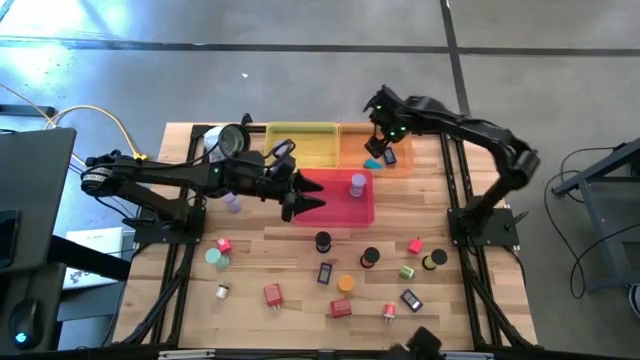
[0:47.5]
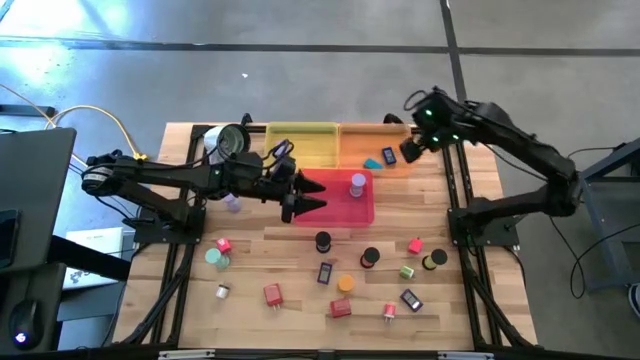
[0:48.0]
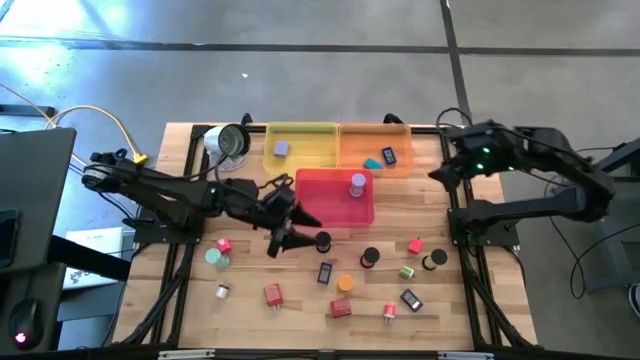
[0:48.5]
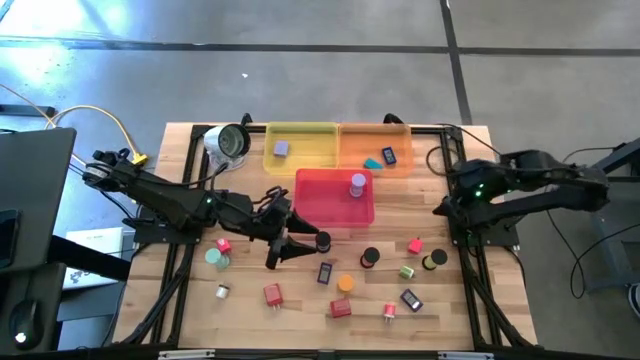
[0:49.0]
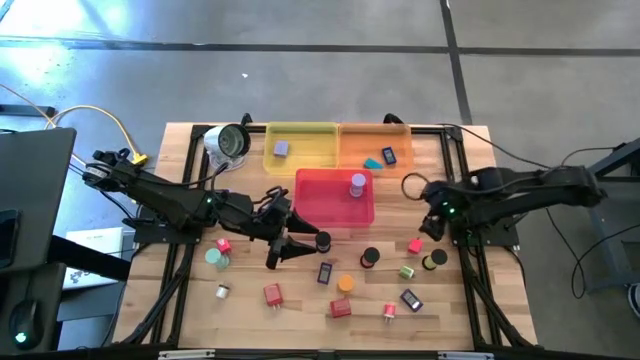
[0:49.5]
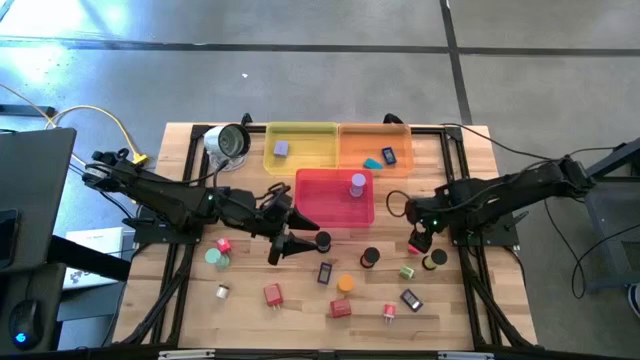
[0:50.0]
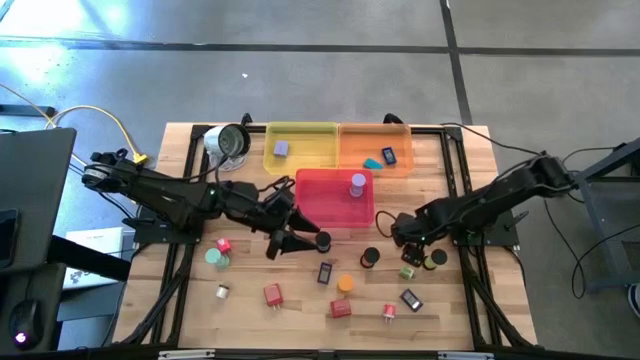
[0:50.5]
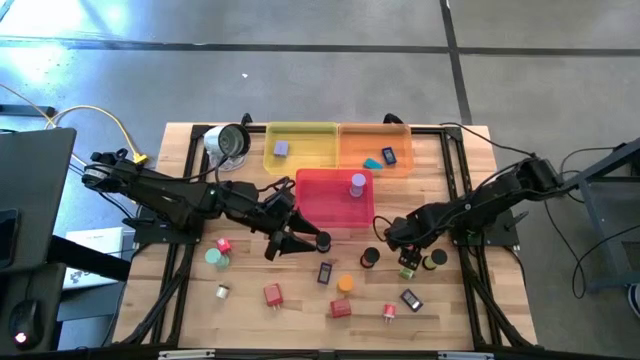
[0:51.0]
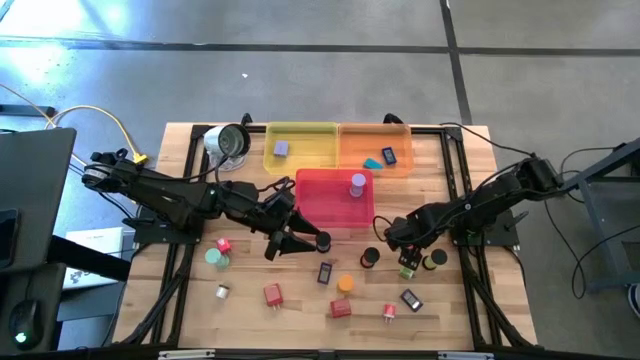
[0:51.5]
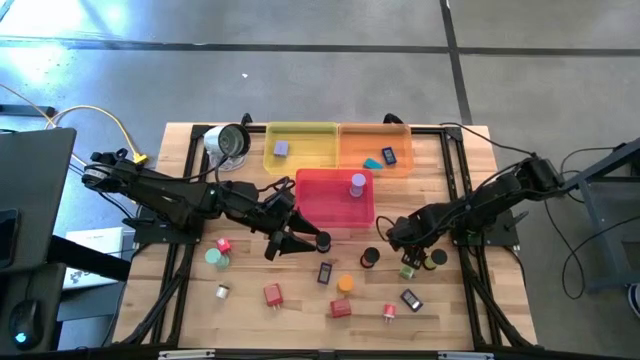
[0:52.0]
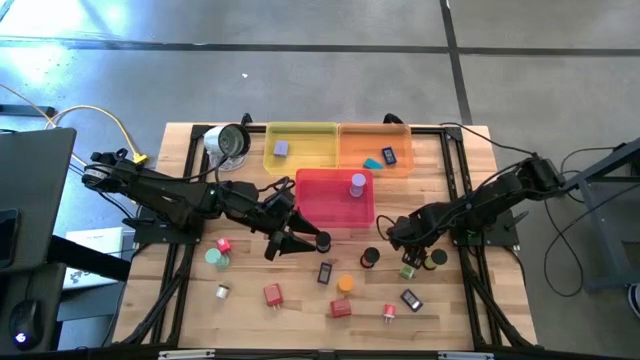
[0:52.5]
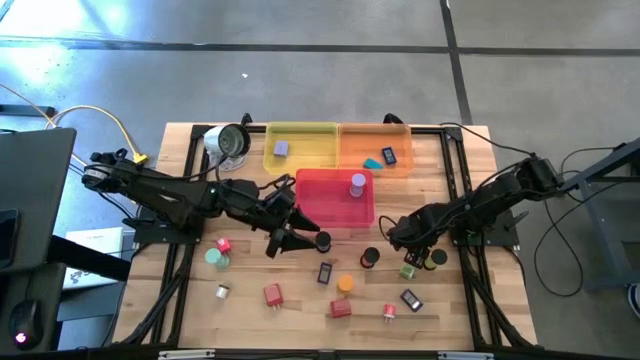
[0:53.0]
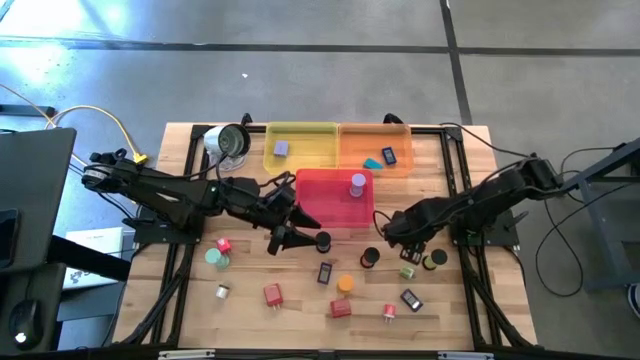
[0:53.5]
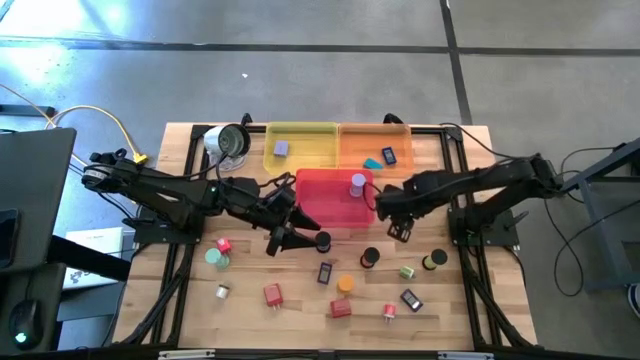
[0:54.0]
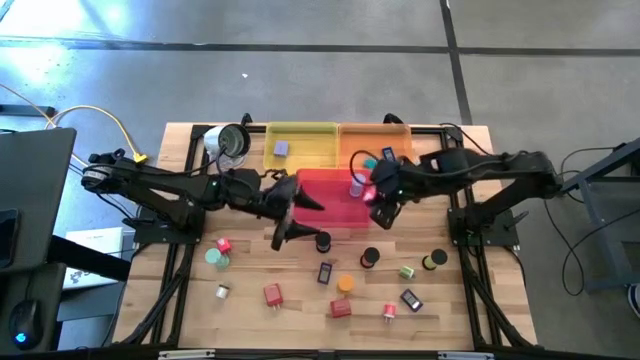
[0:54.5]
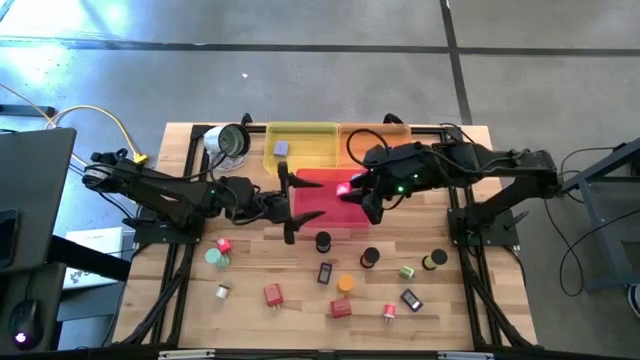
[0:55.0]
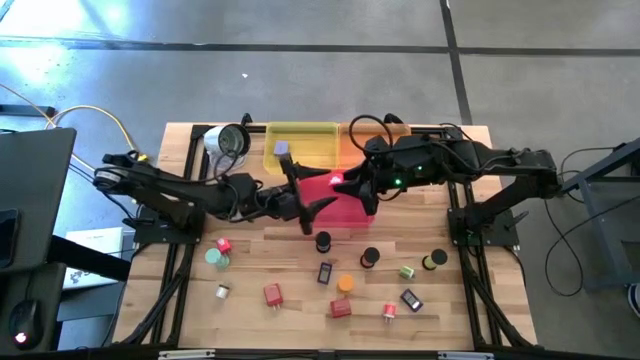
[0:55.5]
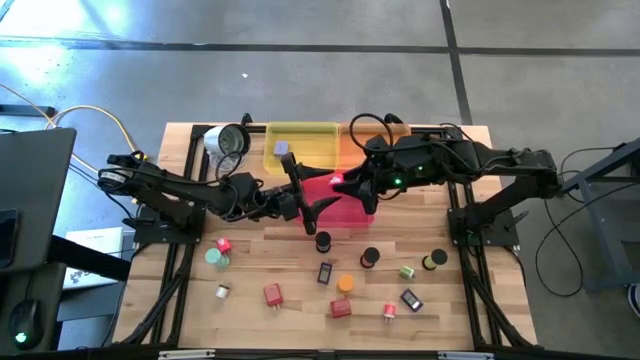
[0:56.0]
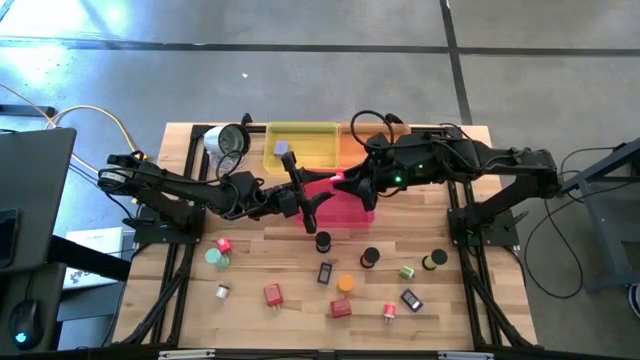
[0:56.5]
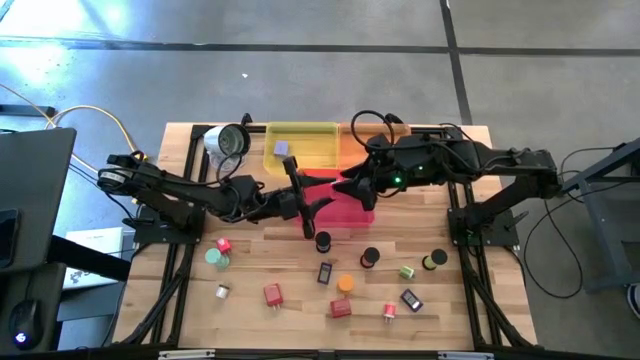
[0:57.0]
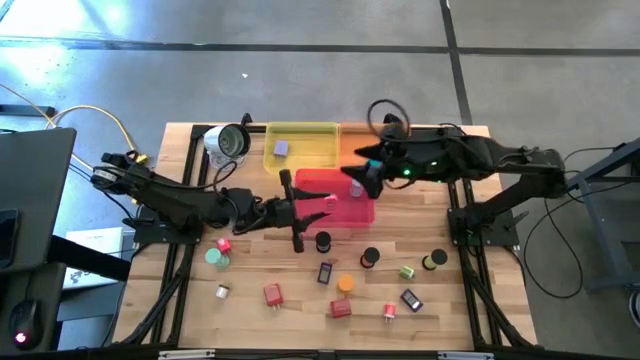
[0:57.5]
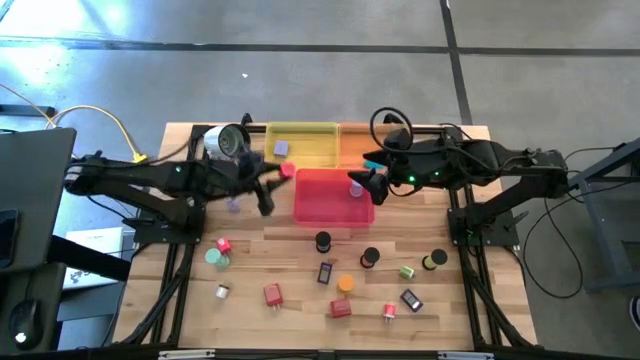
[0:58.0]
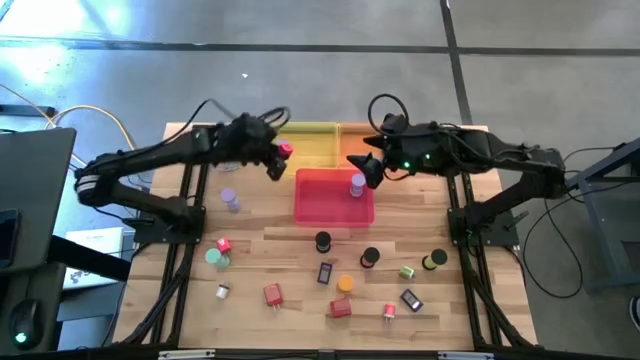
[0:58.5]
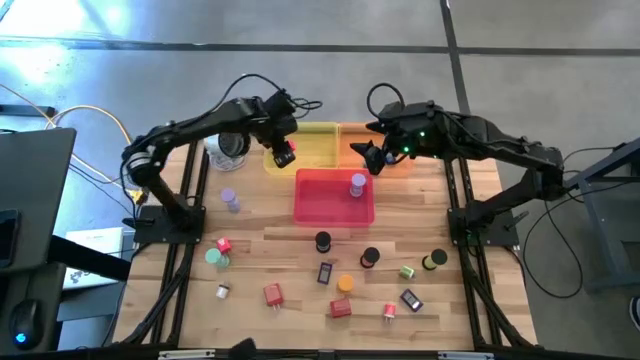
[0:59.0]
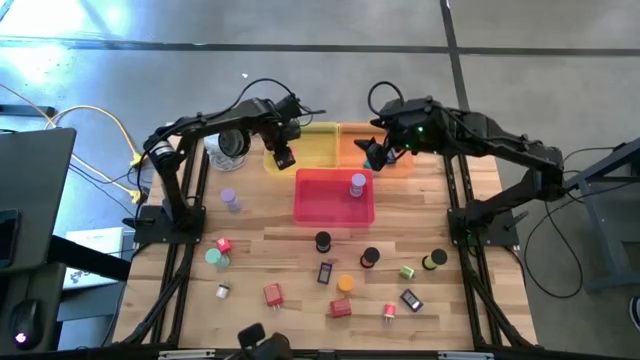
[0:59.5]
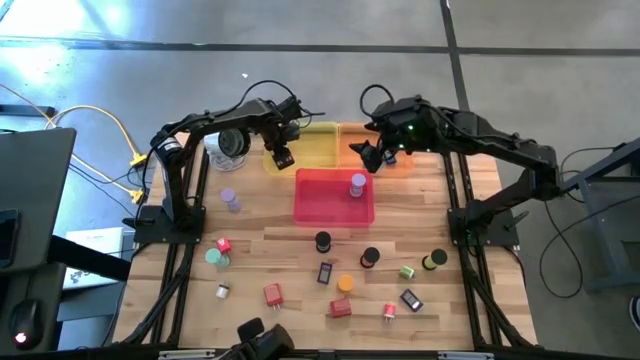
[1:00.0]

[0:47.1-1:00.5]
Task: Pick & Place Office items
Put the right pink charger adapter into the yellow bin

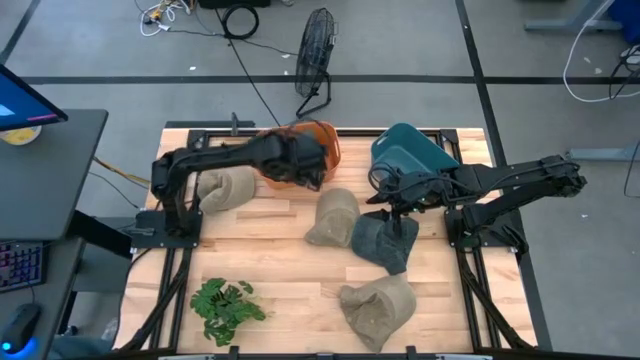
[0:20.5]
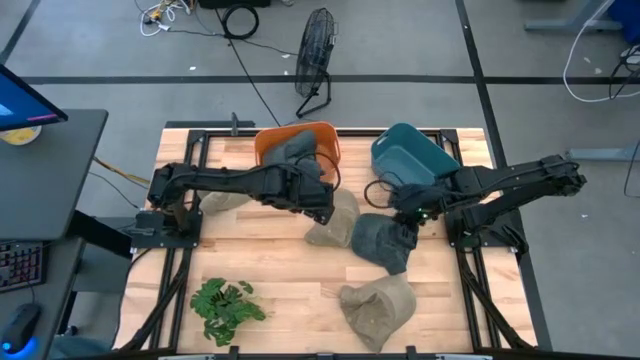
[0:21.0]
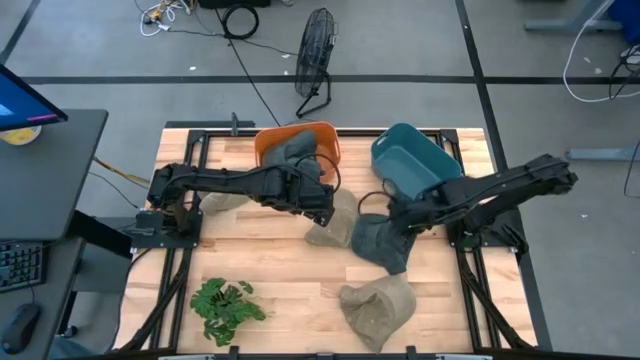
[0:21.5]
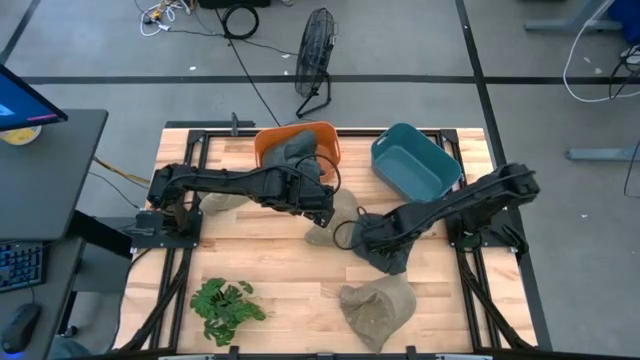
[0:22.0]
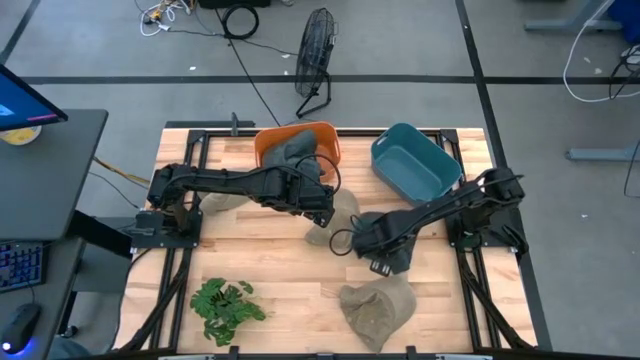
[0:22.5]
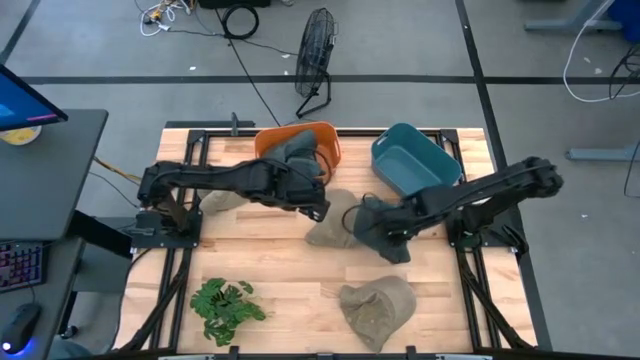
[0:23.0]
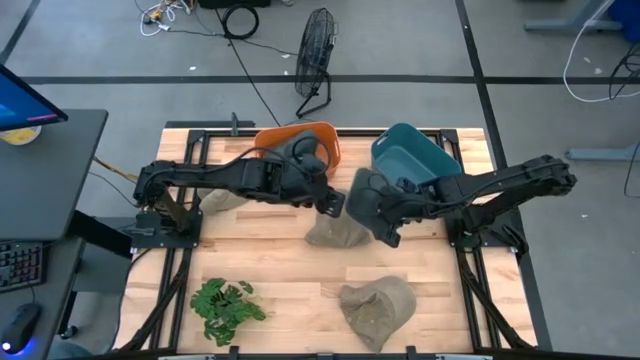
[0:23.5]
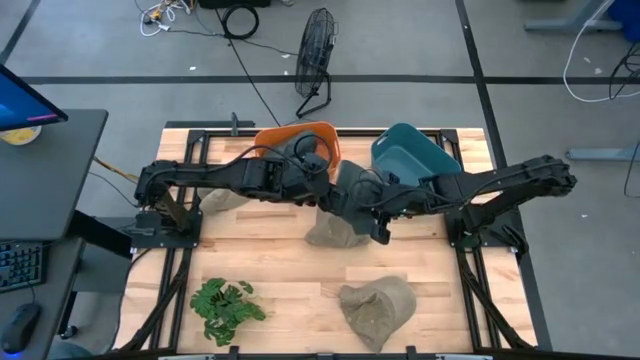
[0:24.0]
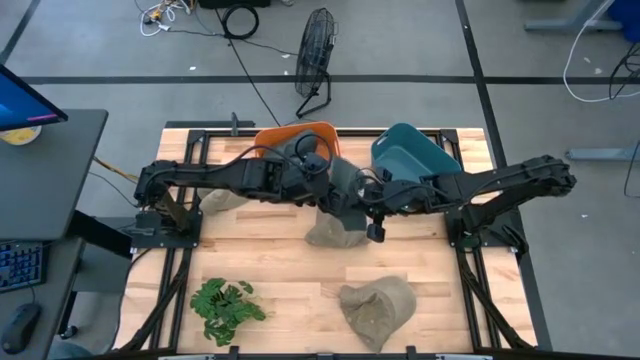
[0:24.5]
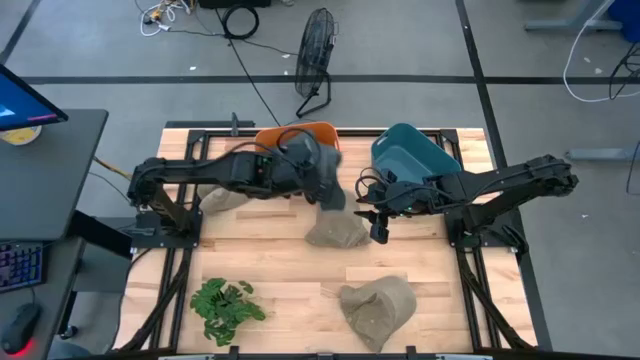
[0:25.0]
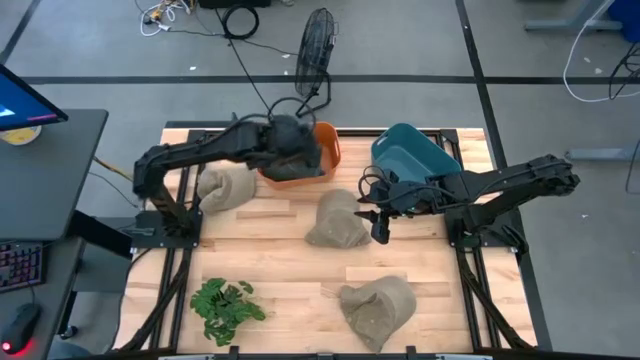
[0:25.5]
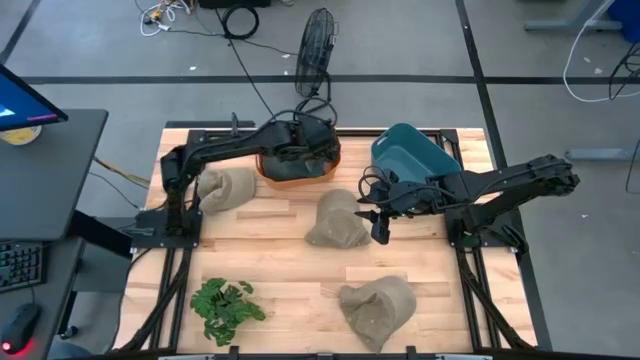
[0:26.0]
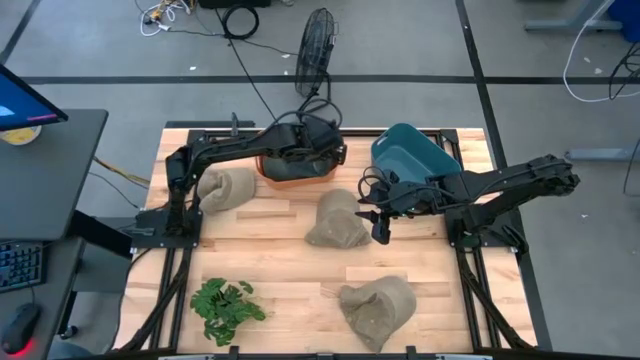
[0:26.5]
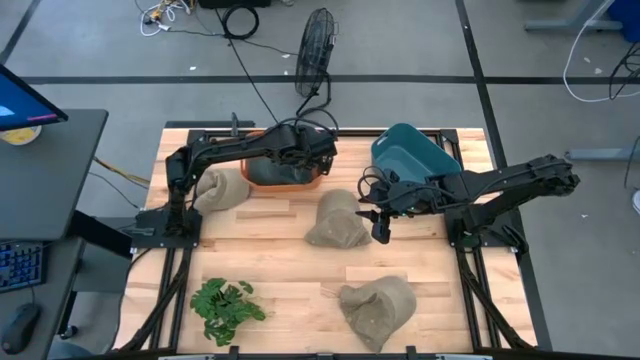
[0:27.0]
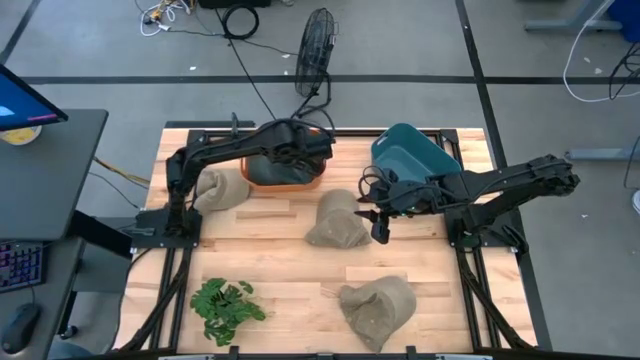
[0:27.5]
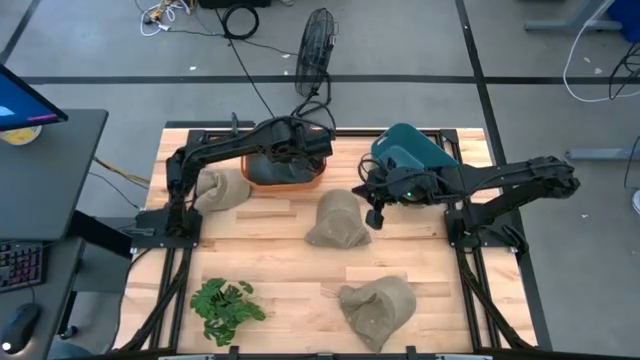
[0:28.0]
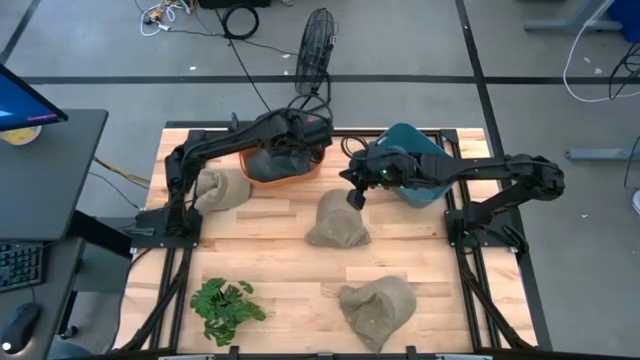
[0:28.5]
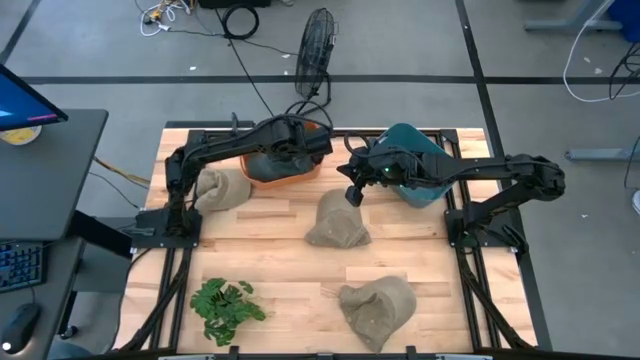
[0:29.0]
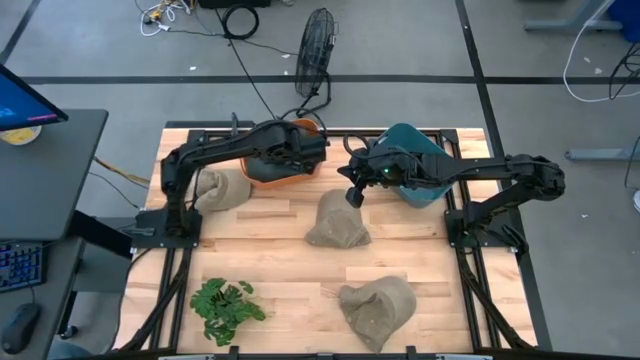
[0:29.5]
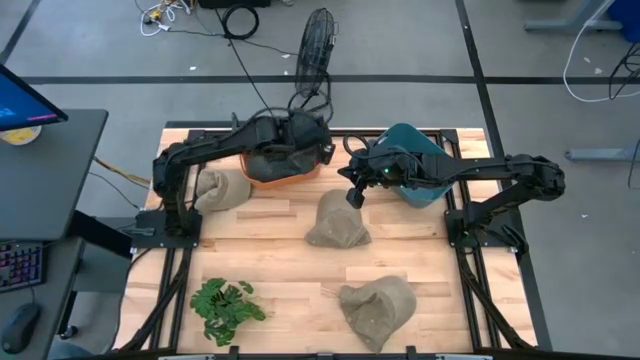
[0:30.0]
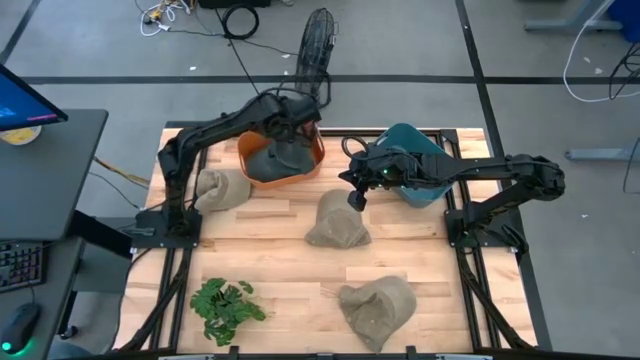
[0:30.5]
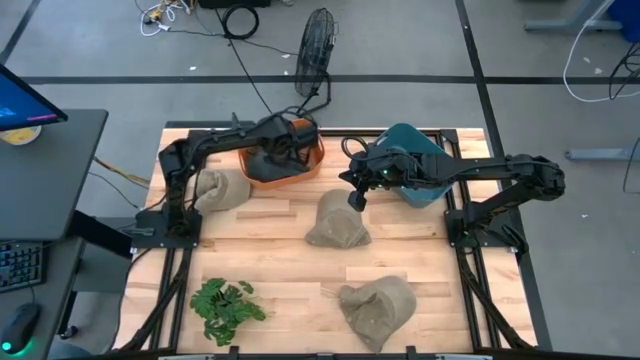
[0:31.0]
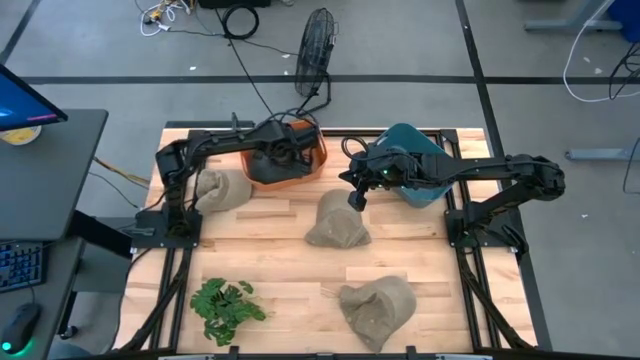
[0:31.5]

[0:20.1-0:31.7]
Task: Pick & Place hat
Put the blue cap into the orange bin
